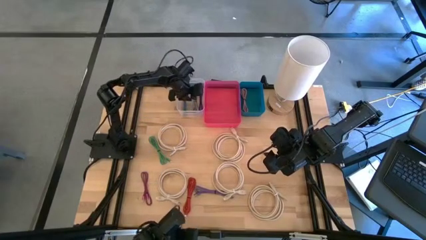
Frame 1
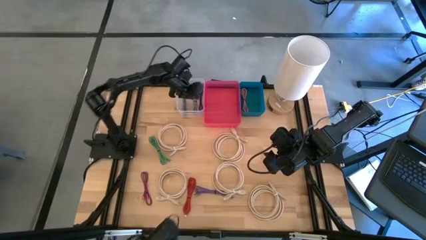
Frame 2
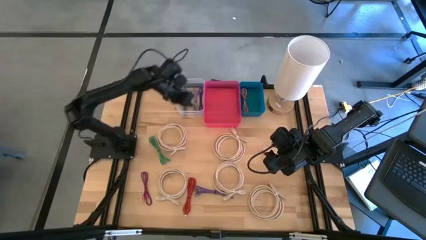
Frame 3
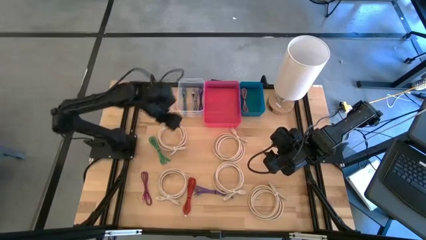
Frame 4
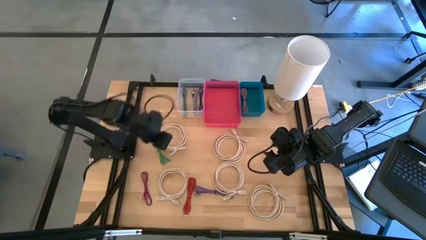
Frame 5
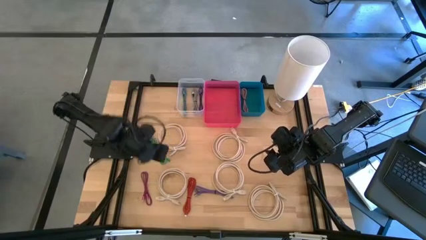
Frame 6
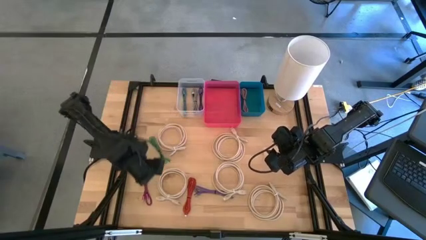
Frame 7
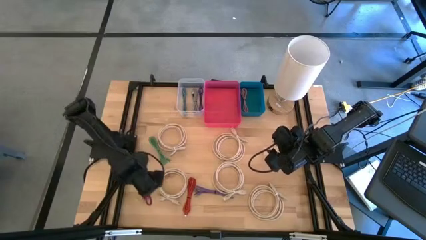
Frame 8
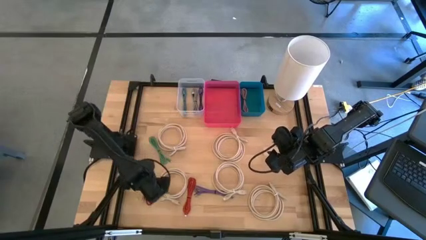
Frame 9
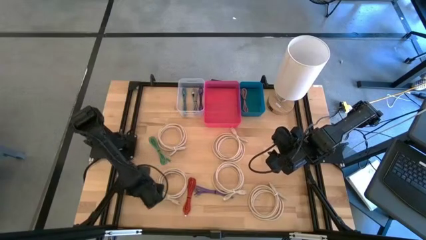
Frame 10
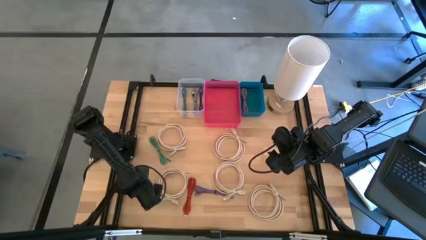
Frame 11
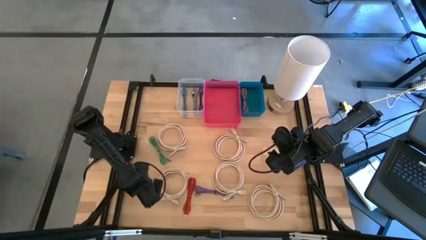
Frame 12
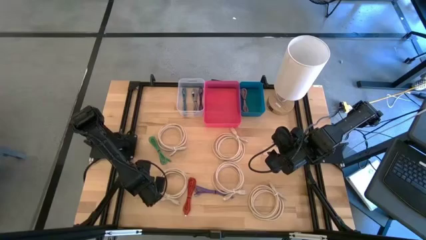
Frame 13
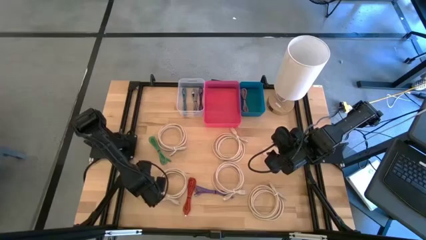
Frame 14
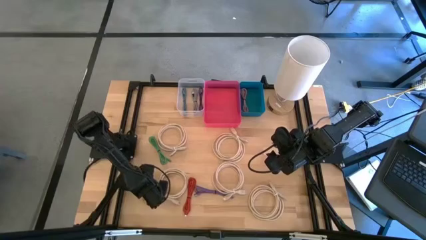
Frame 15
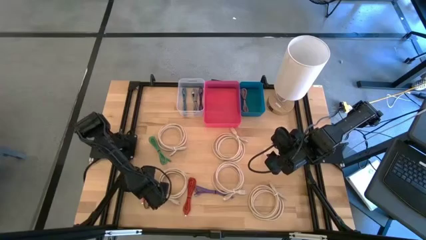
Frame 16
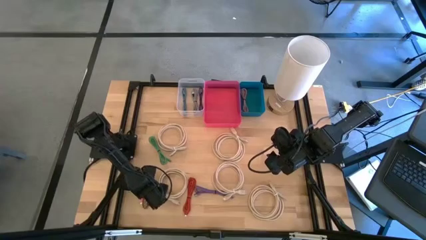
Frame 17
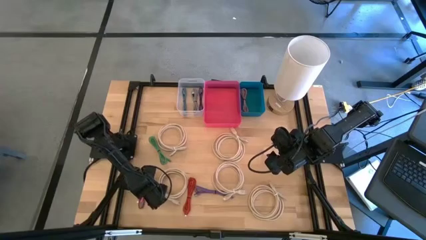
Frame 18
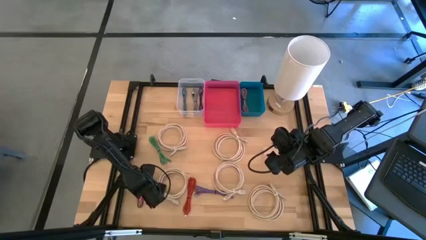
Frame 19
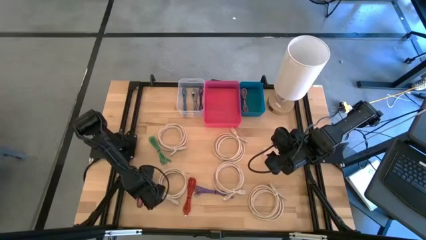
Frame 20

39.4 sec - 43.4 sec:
Task: Pick & Place USB Port
Put the pink and black USB cable into the transparent bin

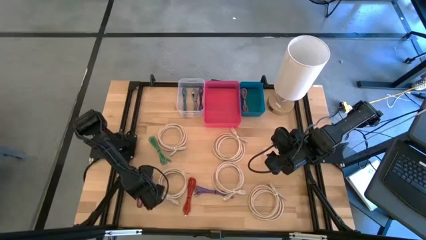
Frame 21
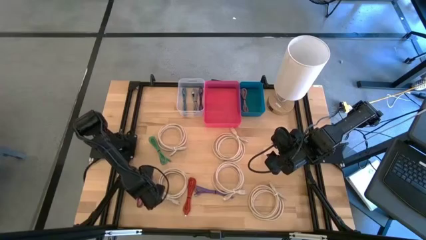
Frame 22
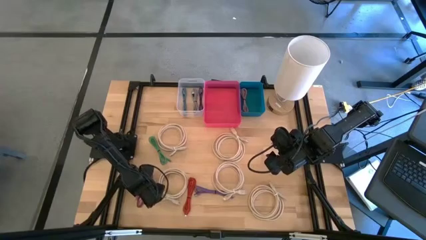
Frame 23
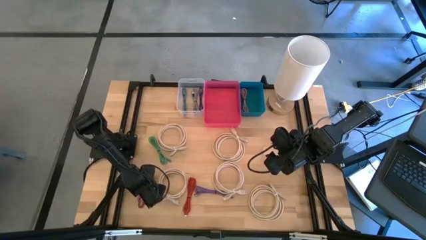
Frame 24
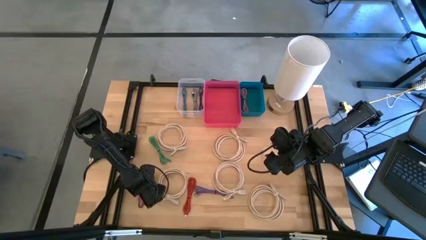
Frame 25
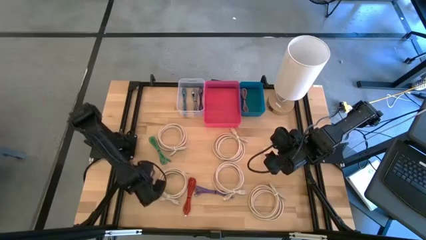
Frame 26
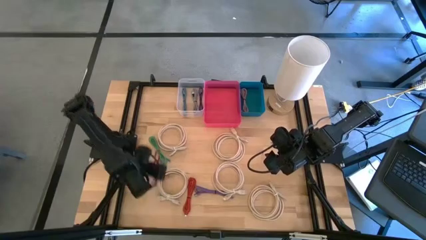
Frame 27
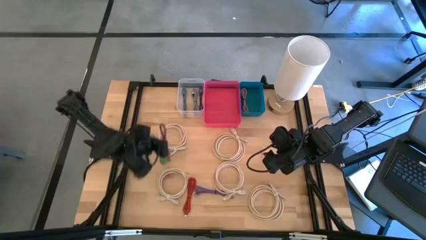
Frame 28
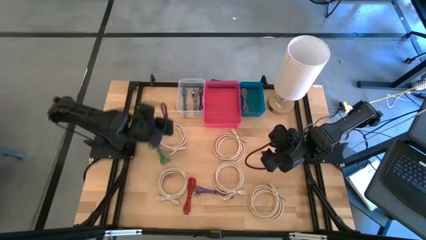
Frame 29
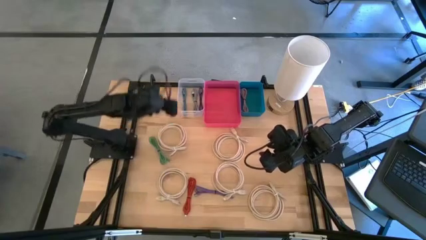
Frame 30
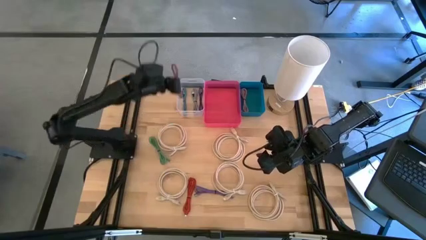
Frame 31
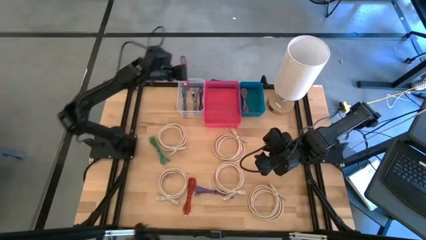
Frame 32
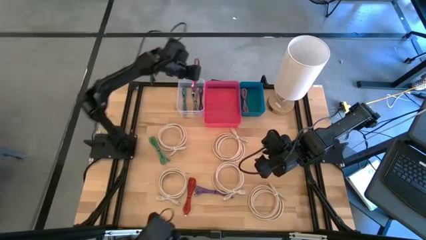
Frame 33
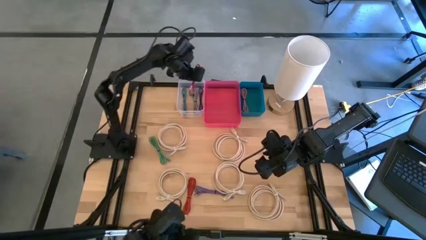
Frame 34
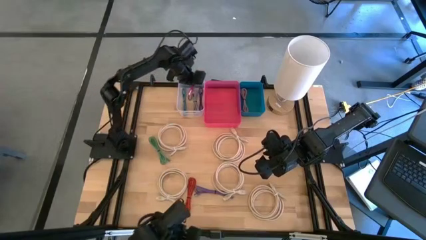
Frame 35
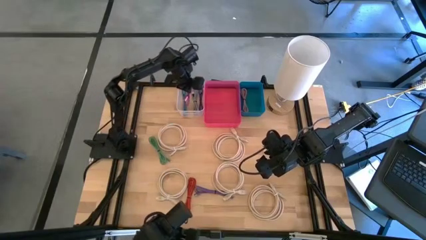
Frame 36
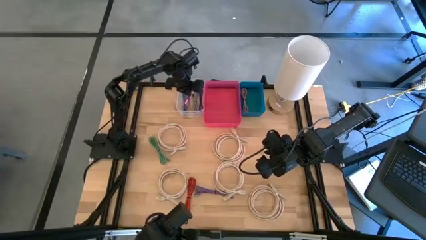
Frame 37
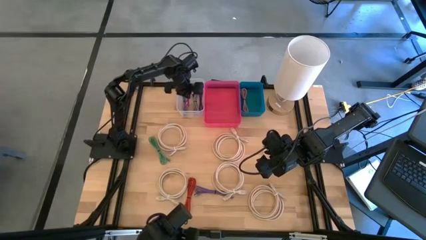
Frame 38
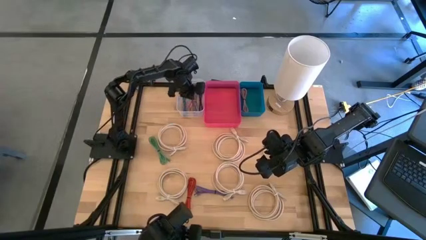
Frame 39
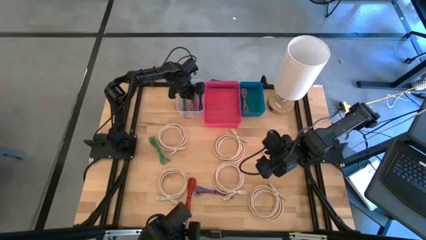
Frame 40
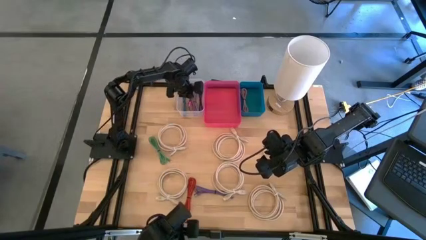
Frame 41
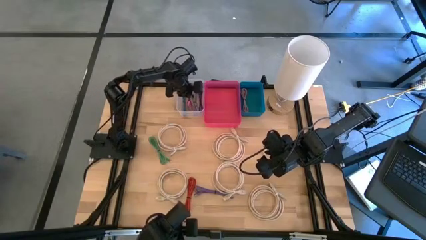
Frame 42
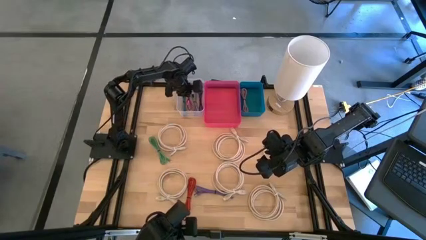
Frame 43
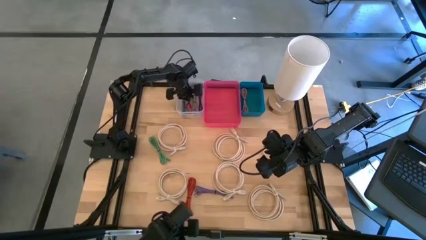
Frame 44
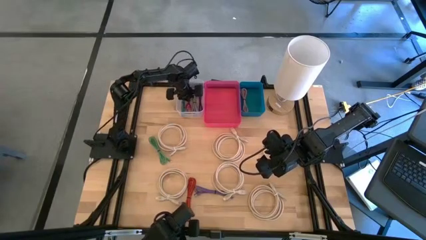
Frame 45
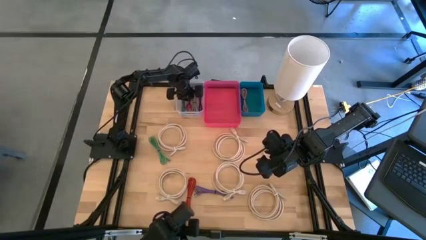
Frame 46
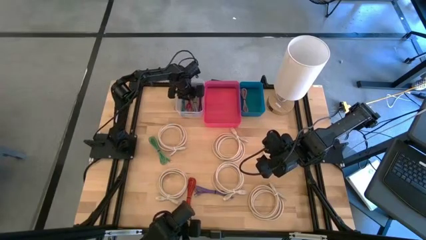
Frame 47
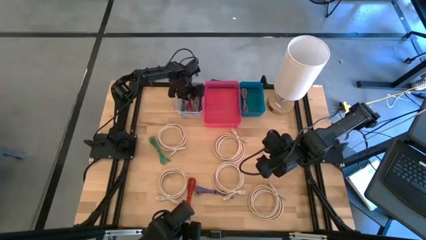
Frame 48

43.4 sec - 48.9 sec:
Put the pink and black USB cable into the transparent bin

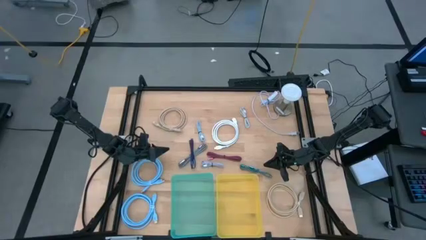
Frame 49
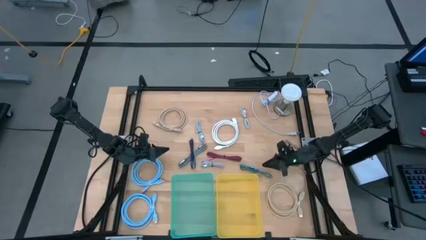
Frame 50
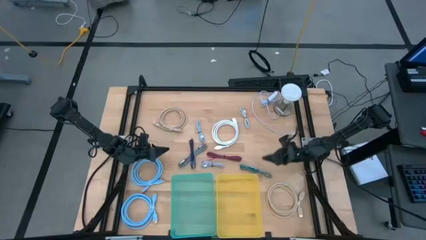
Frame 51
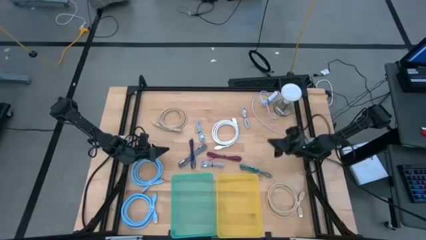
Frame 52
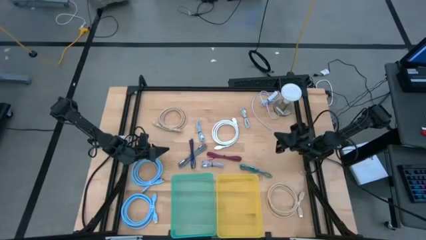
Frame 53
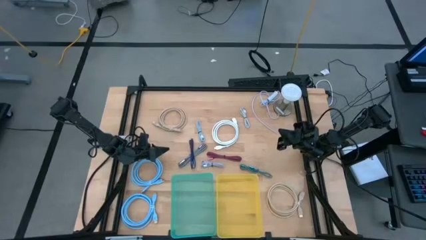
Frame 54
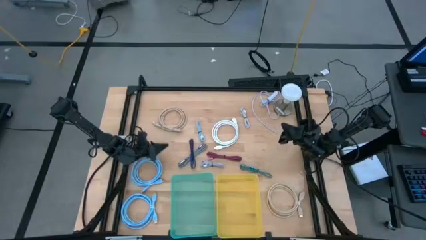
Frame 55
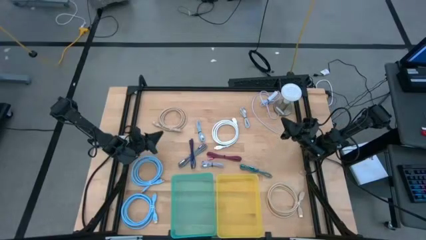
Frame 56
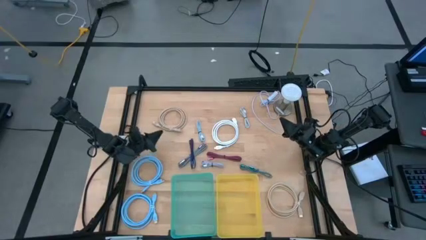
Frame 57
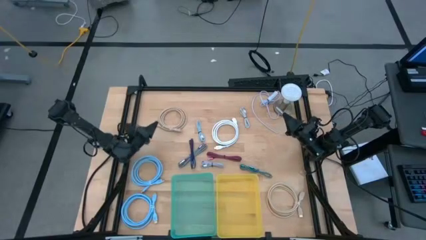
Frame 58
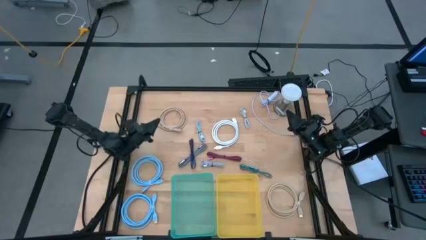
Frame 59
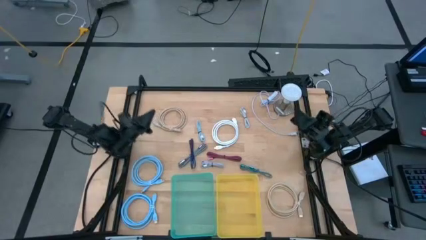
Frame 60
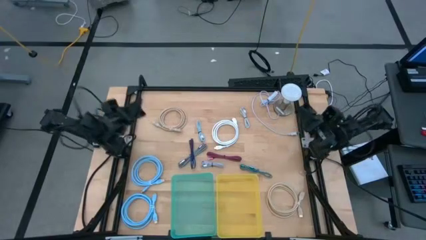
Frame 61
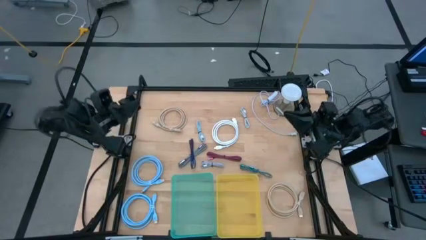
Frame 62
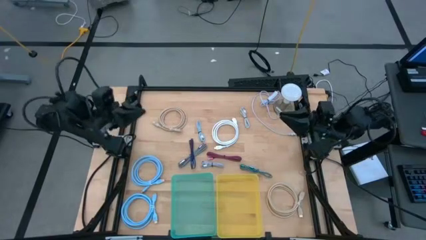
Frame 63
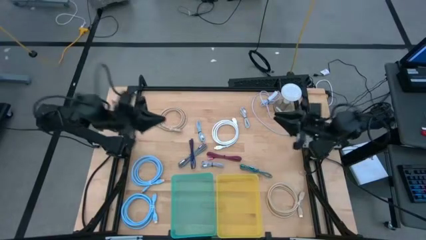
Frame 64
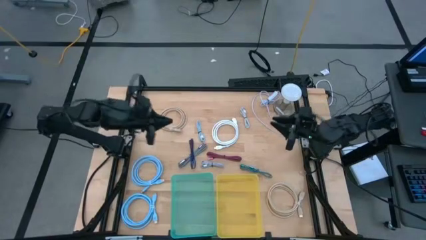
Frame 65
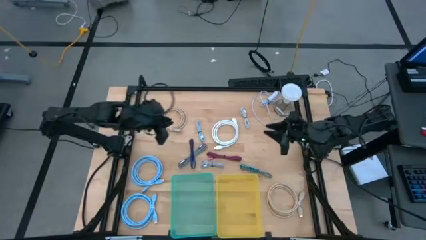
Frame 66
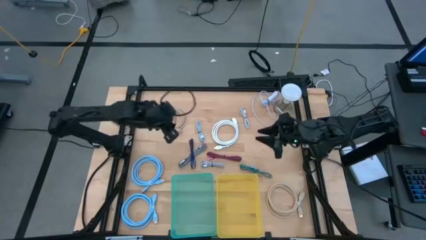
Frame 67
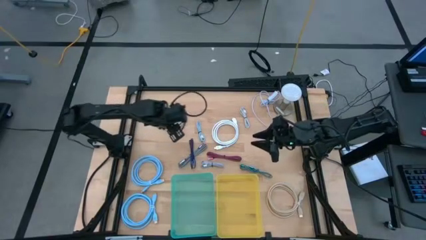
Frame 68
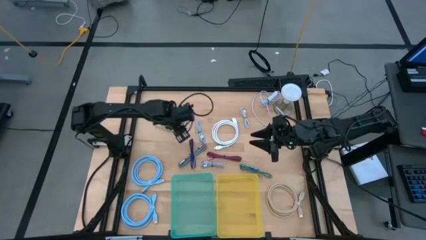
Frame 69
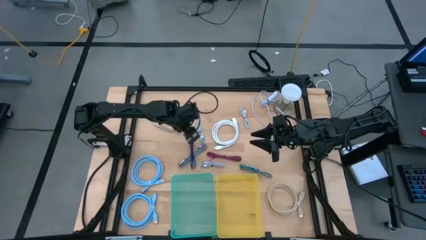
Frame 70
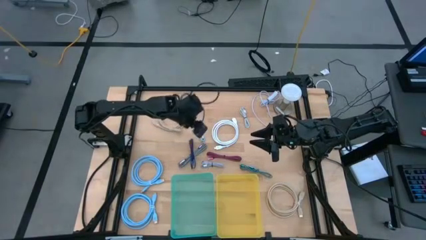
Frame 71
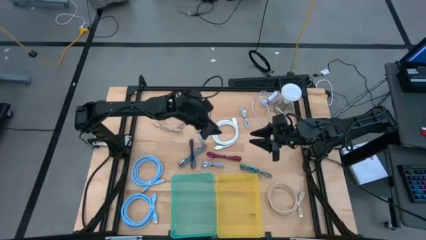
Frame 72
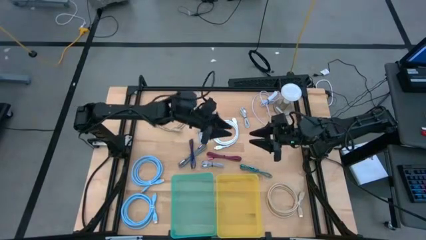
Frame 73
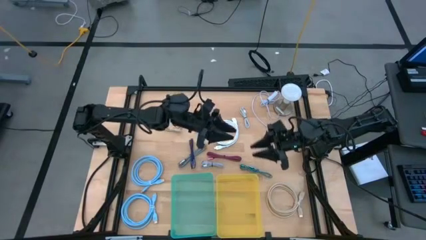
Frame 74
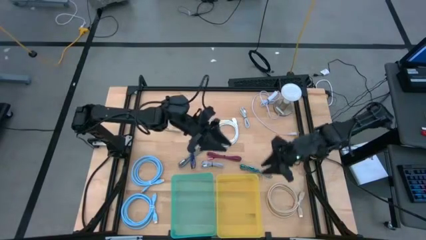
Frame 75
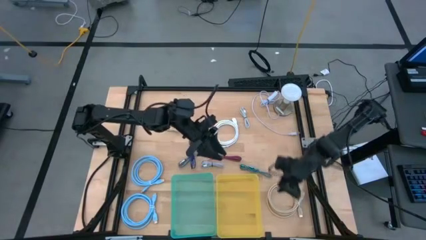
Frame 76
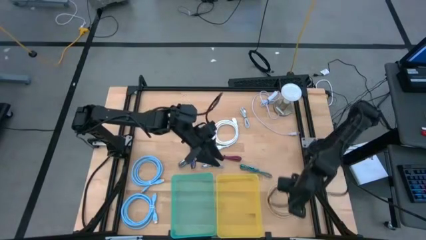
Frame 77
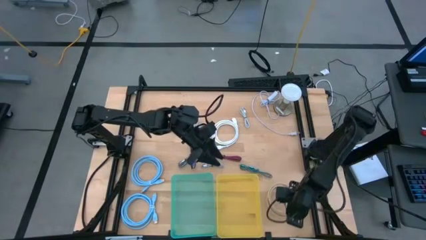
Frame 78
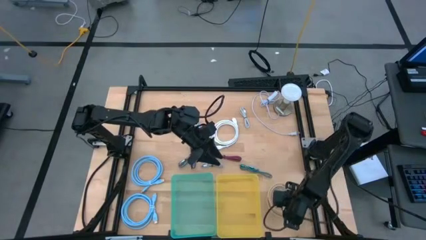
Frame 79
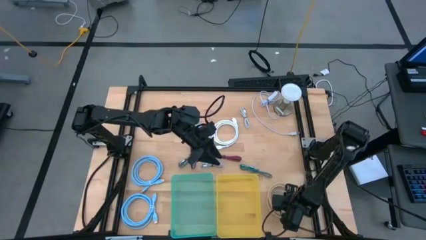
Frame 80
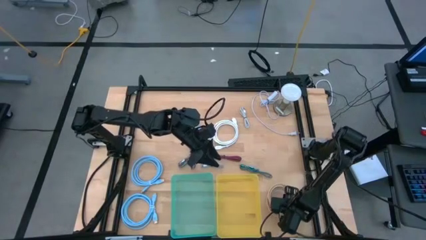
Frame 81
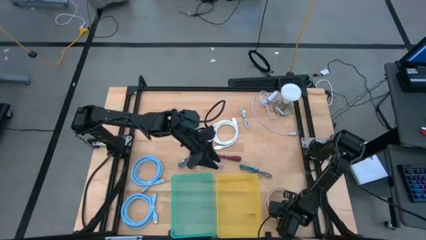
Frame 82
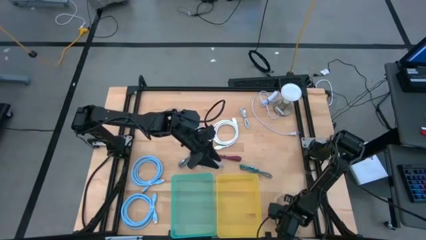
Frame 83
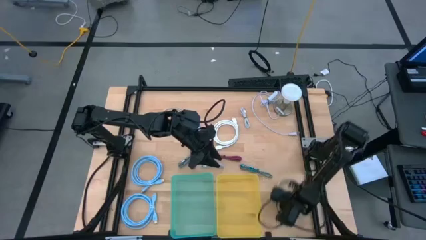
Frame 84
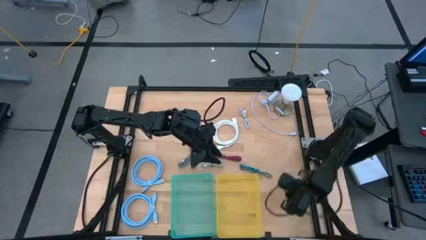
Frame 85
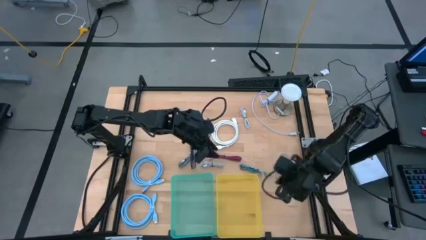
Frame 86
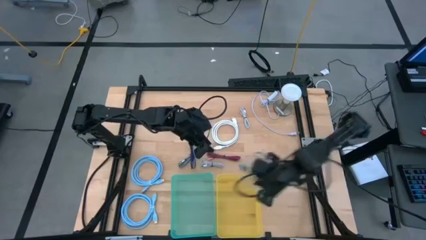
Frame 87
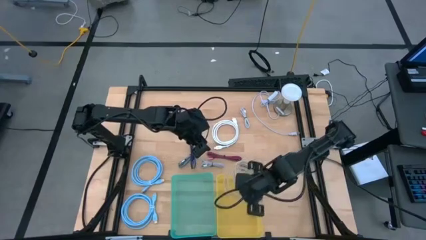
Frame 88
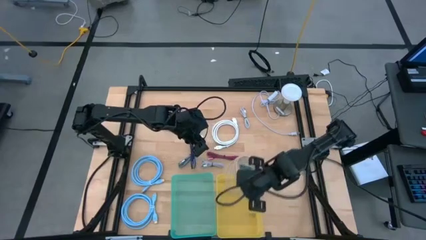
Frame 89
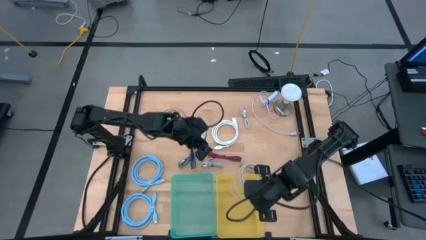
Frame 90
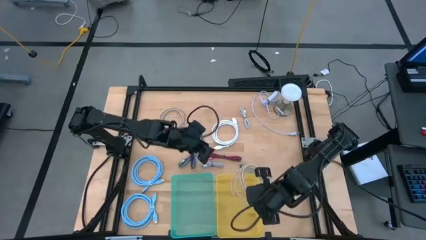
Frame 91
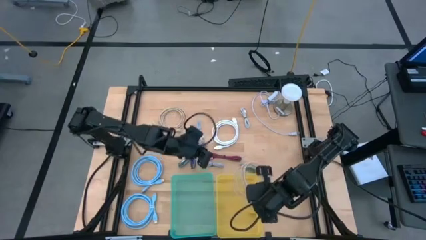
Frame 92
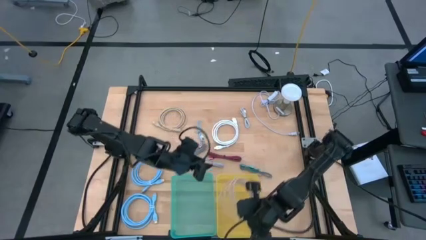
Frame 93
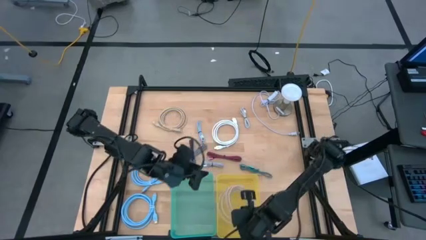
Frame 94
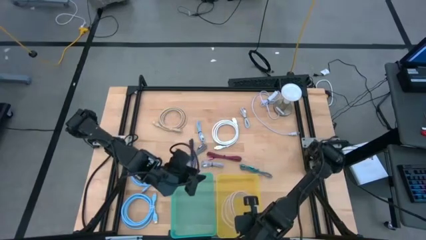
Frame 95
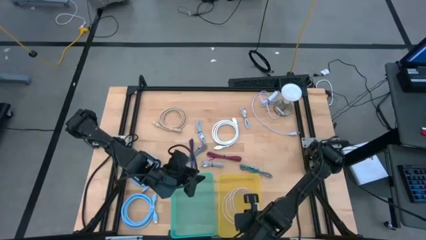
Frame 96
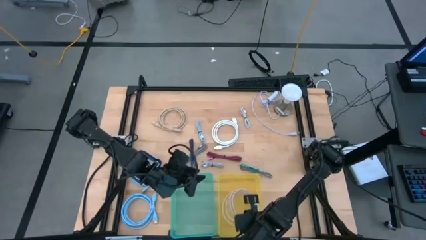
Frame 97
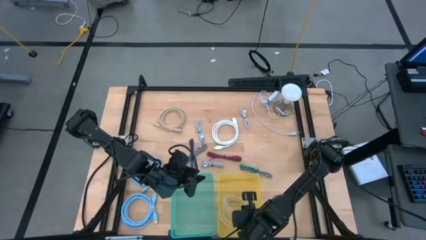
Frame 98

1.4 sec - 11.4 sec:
Task: Pick & Place USB Port
Put the bottom brown HDMI cable into the yellow bin
